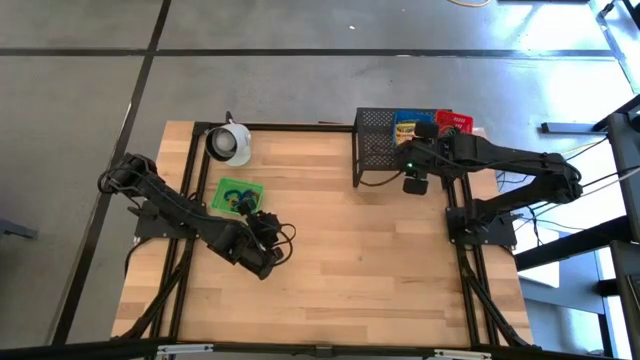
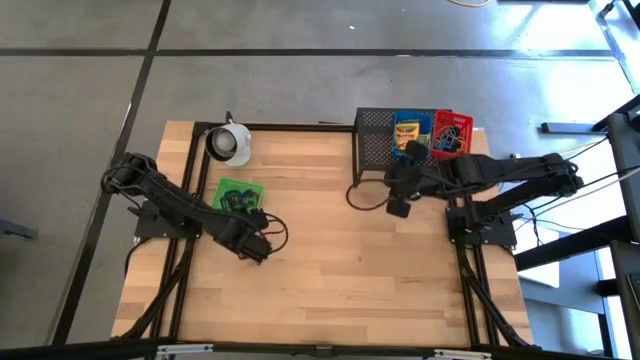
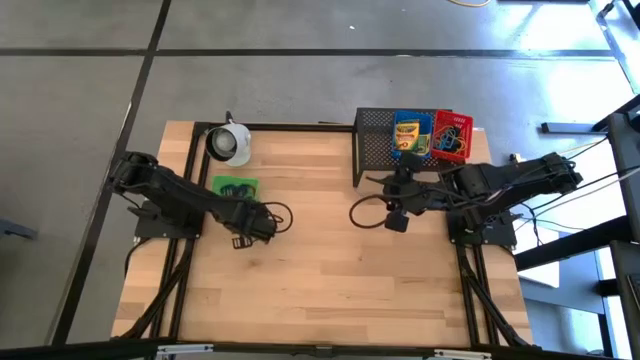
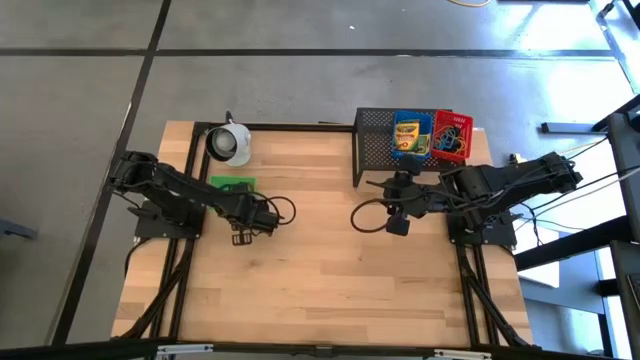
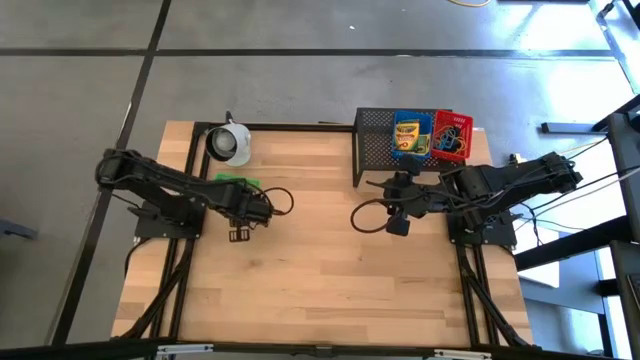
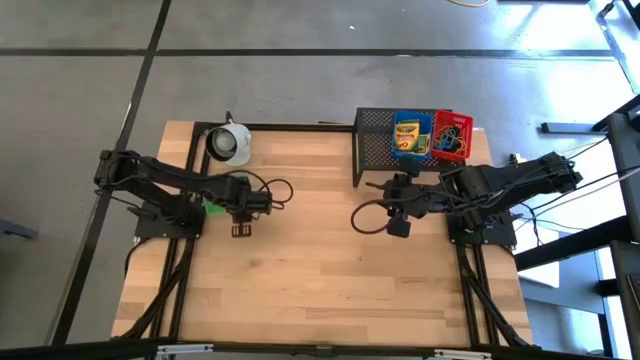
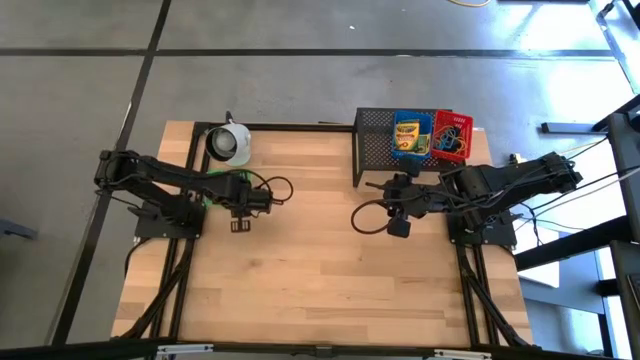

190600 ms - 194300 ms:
Task: Pick & Place Office Desk Supplies
Put the green bin containing spring keychains on the shelf

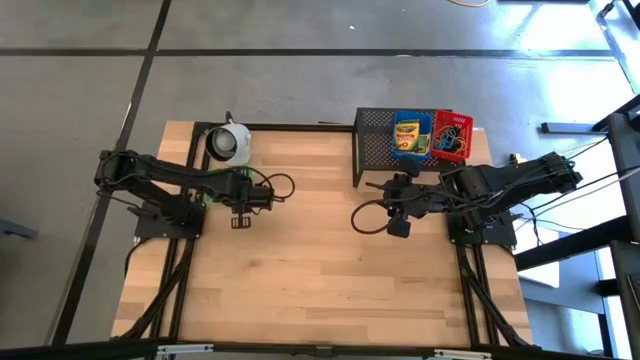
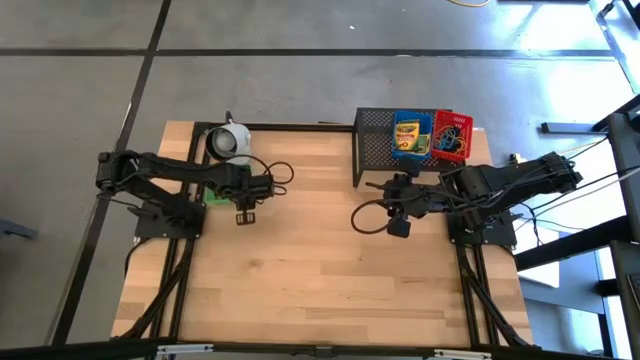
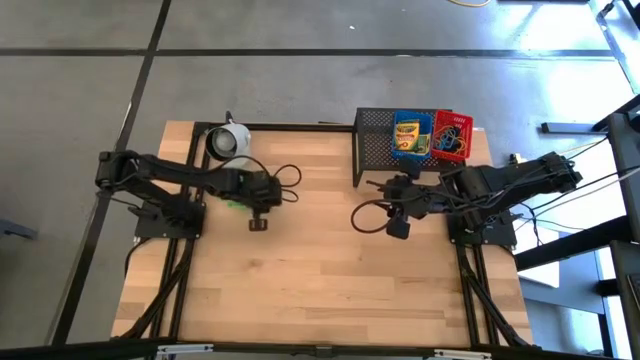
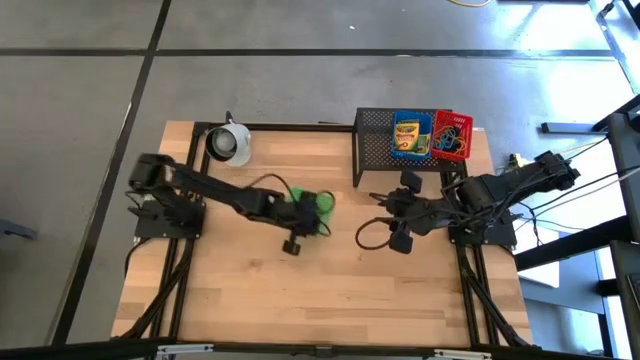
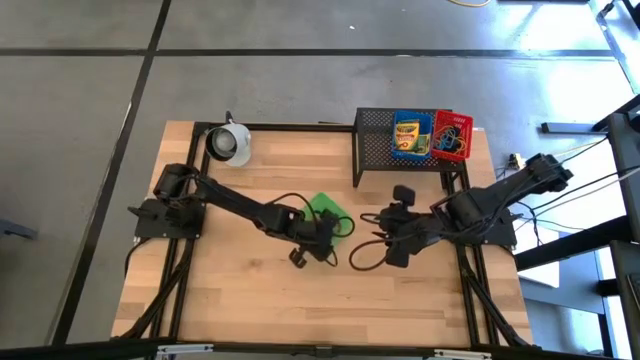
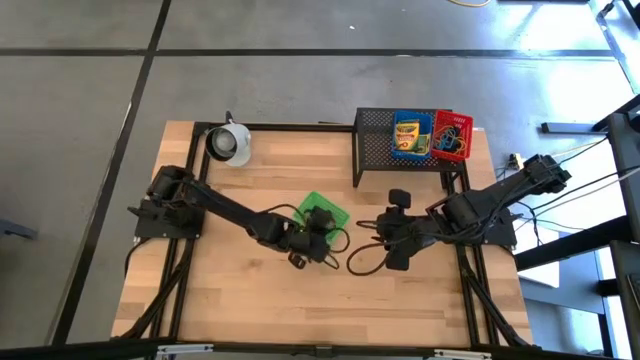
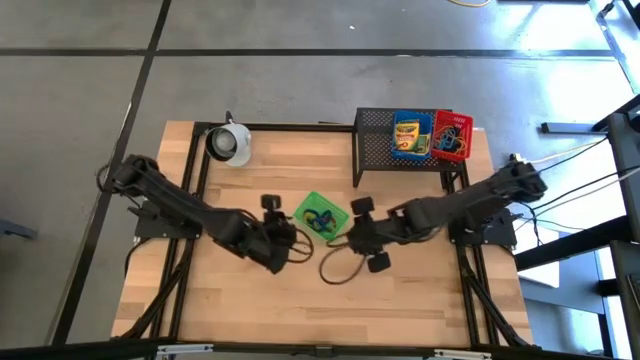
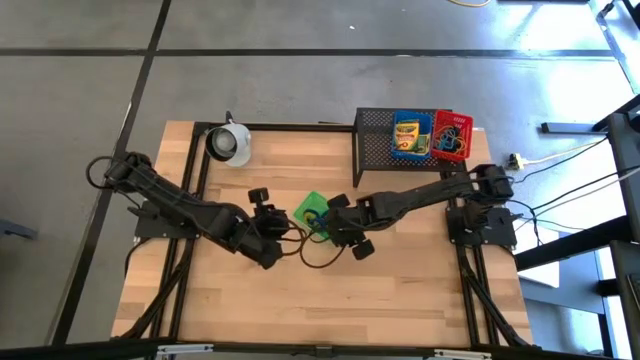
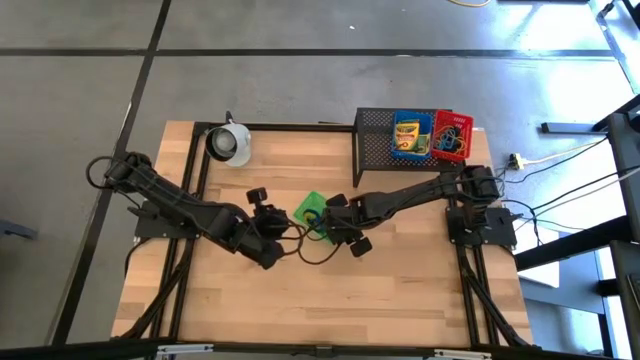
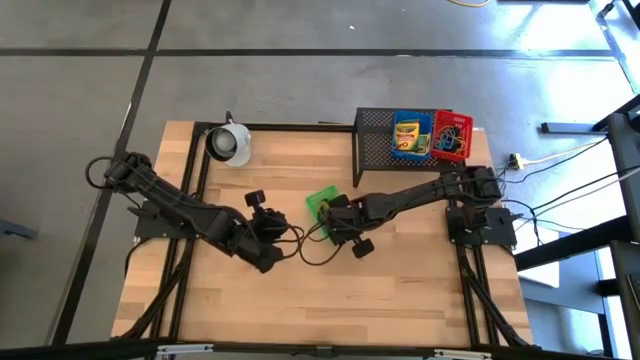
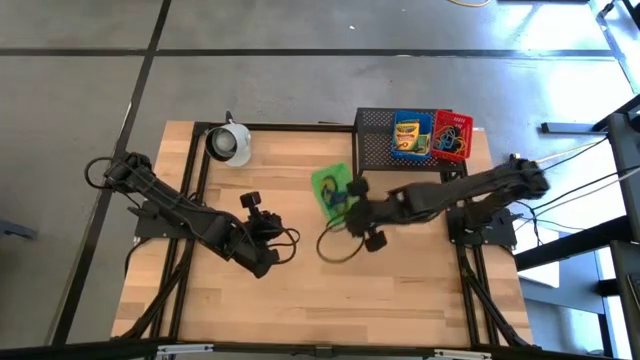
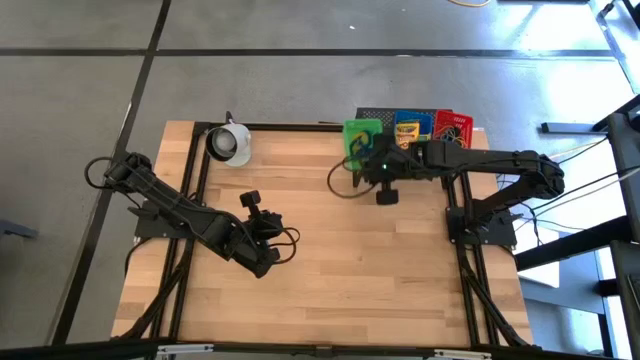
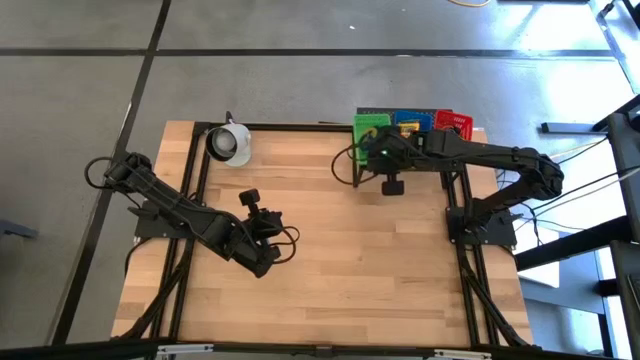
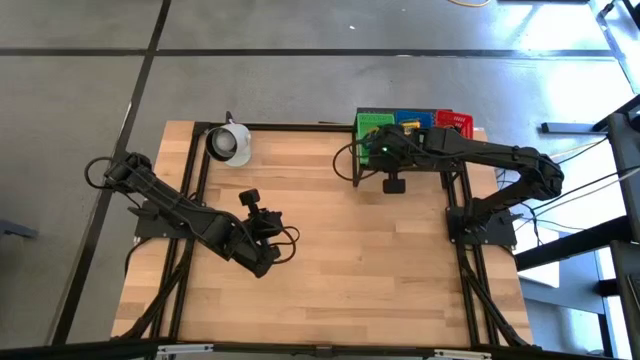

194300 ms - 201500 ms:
Put the green bin containing spring keychains on the shelf

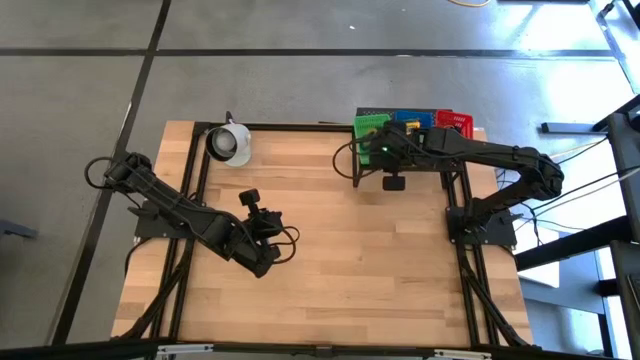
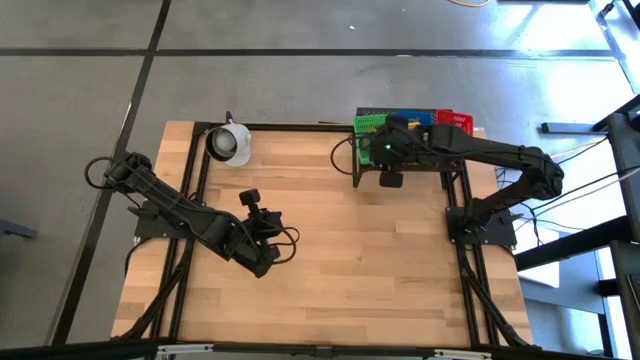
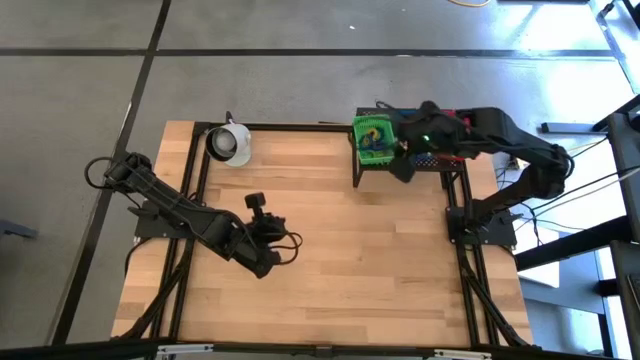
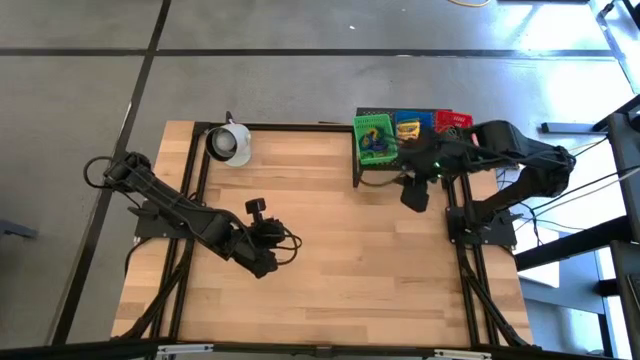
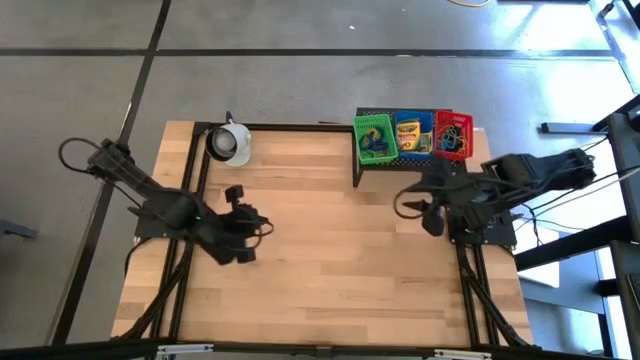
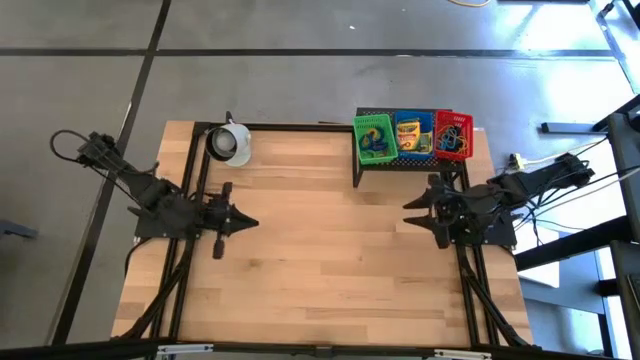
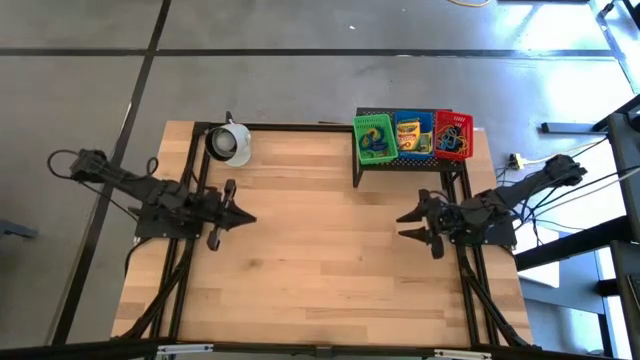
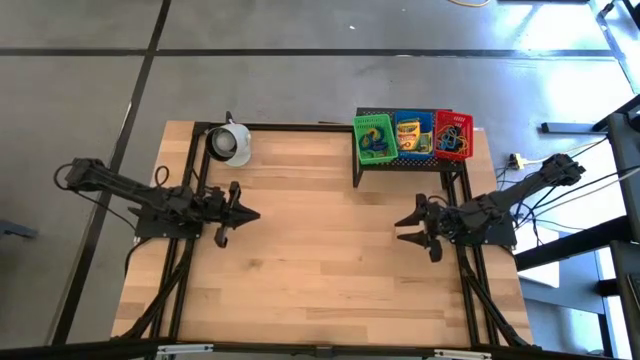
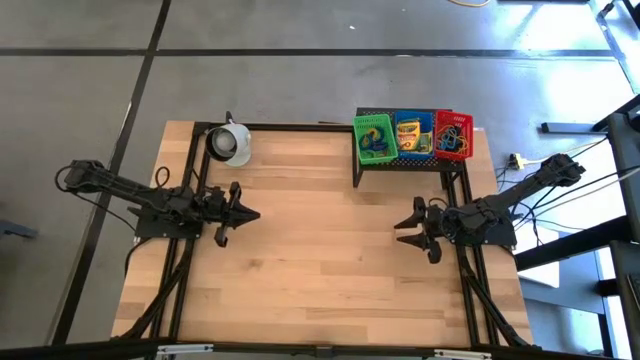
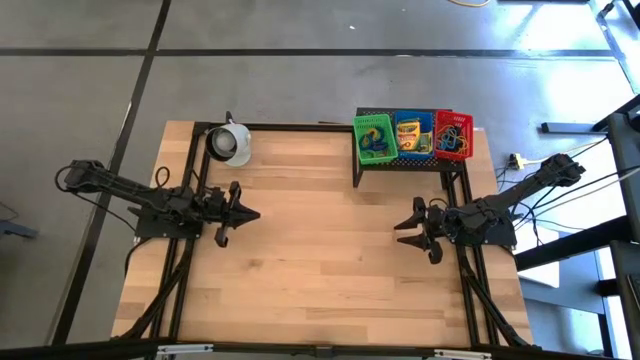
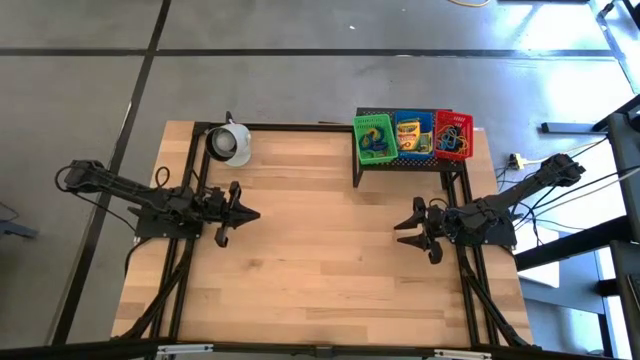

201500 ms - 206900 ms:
Return to Home Position

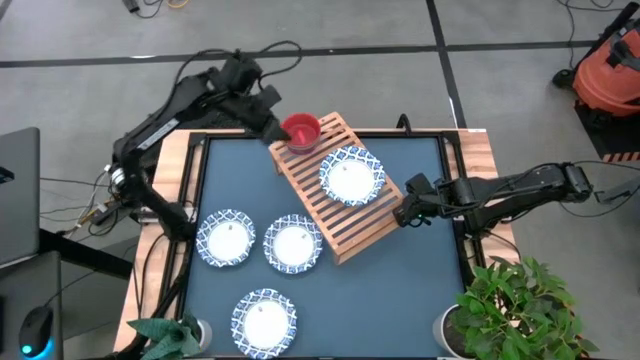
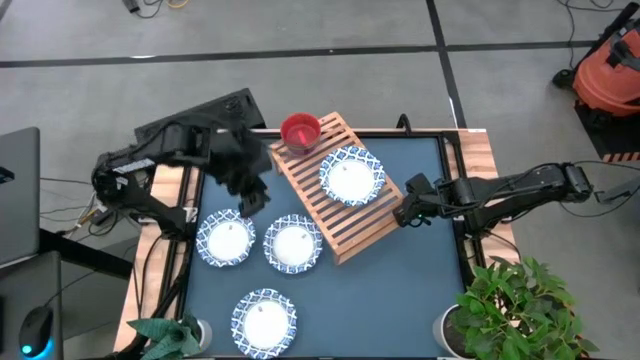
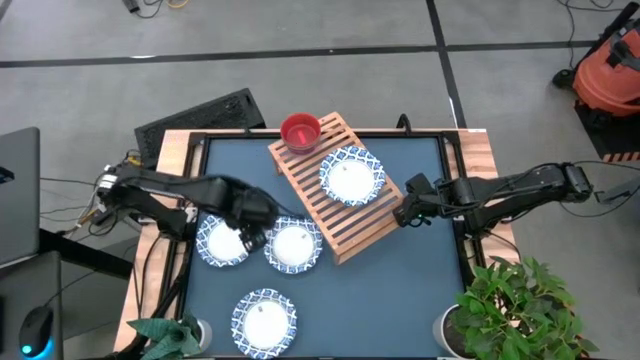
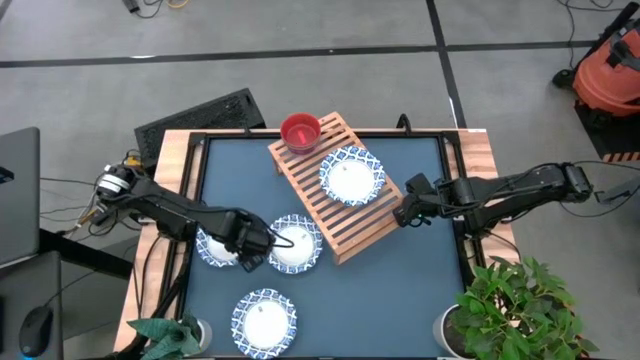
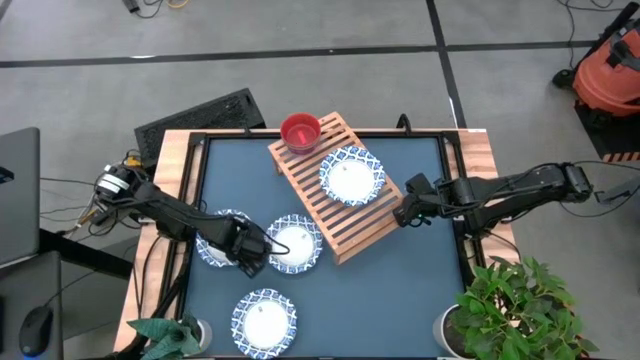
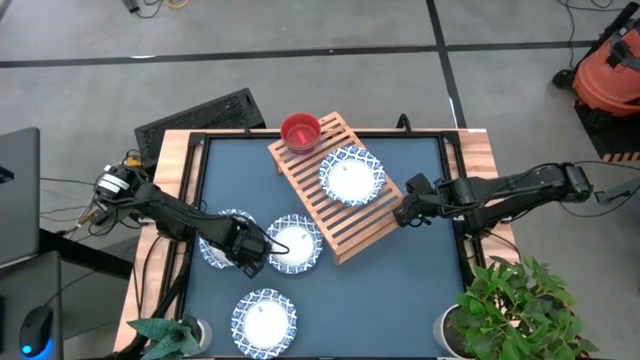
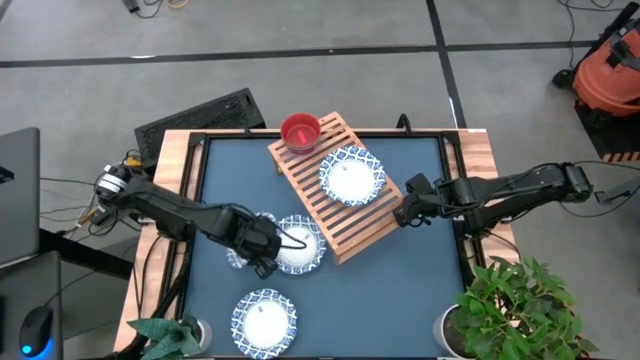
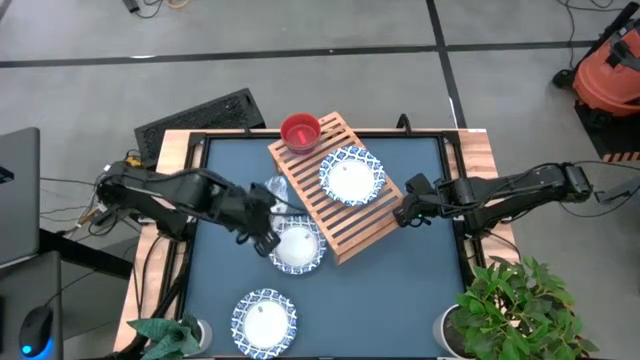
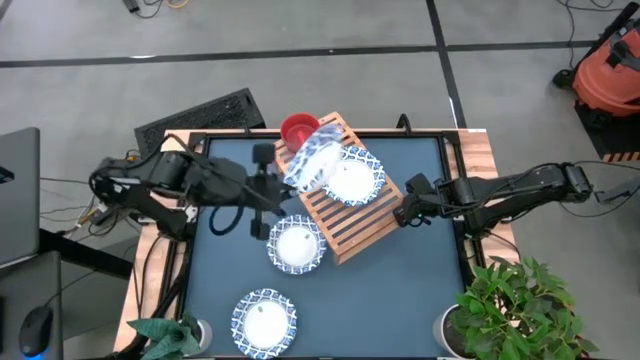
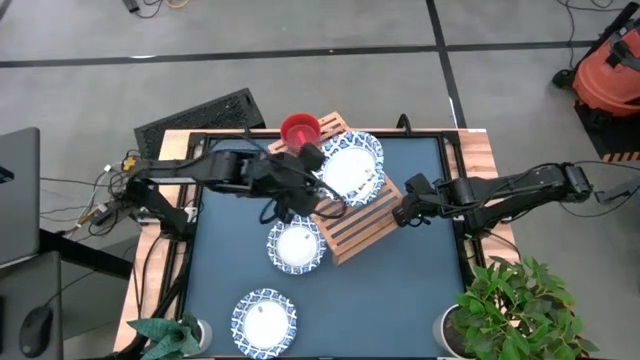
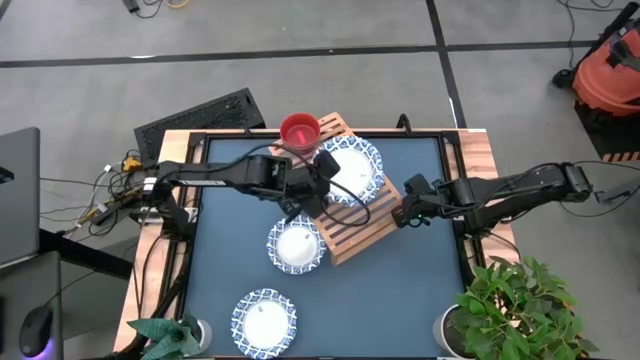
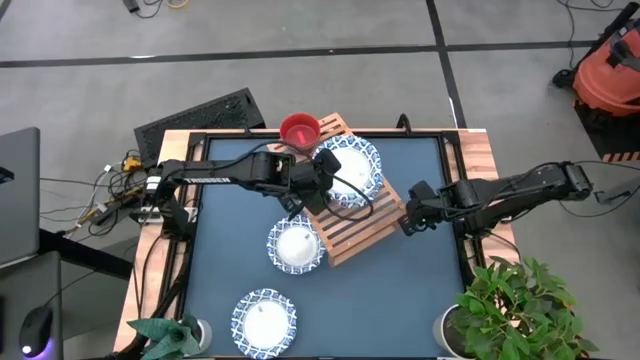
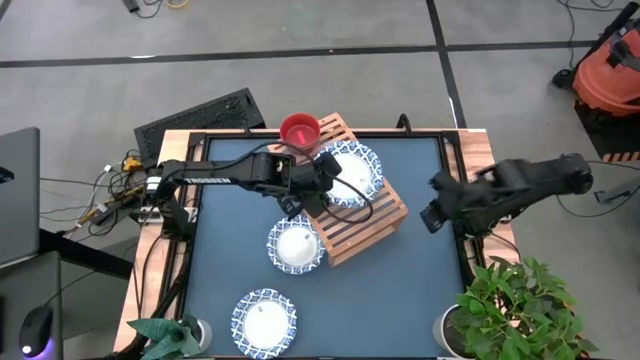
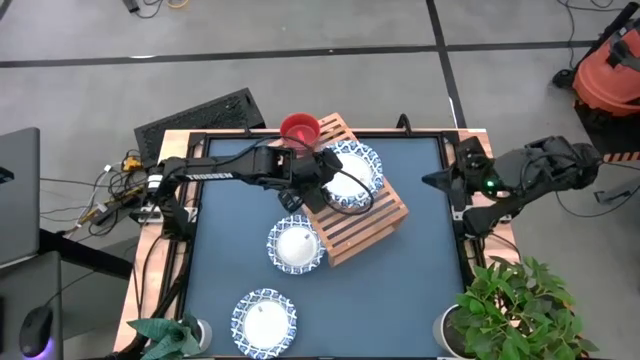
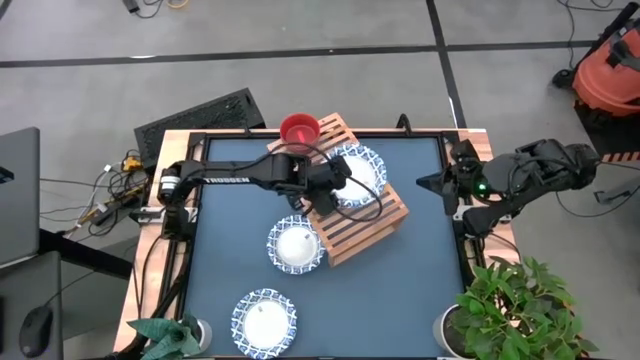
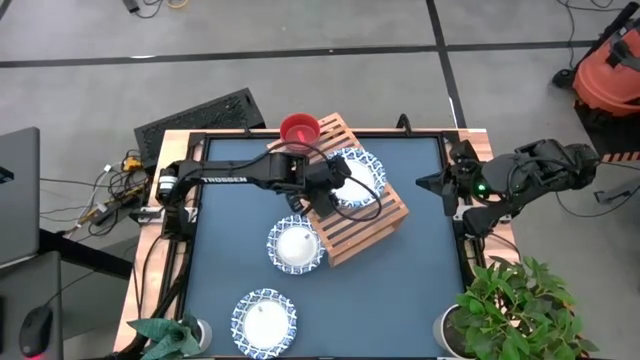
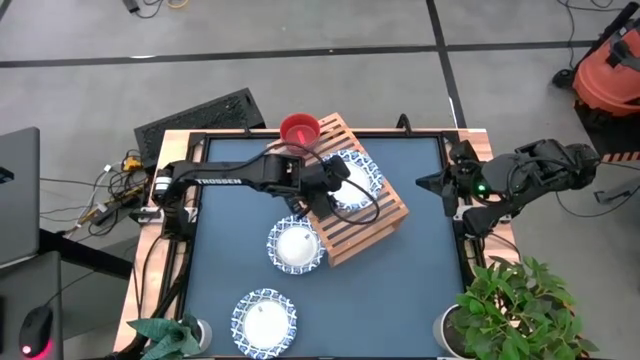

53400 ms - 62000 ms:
Task: Place and stack bowls onto a shelf
Stack the white bowl on top of the white bowl on the shelf
